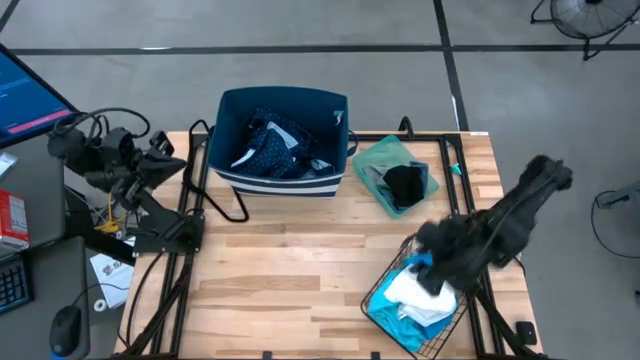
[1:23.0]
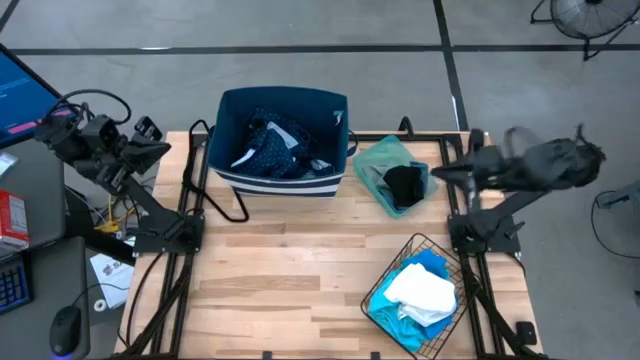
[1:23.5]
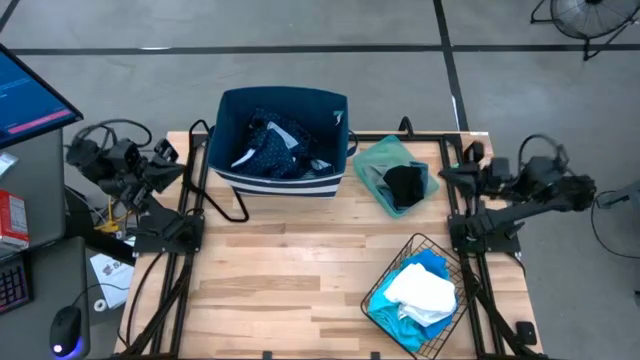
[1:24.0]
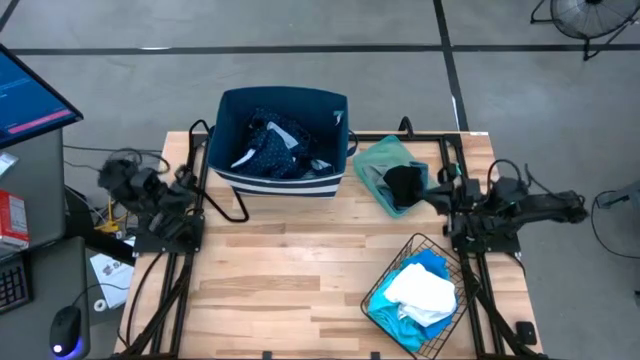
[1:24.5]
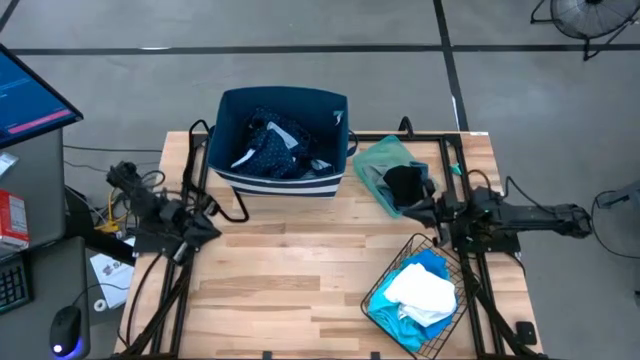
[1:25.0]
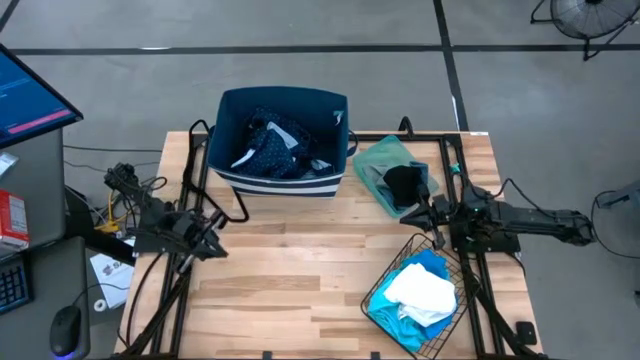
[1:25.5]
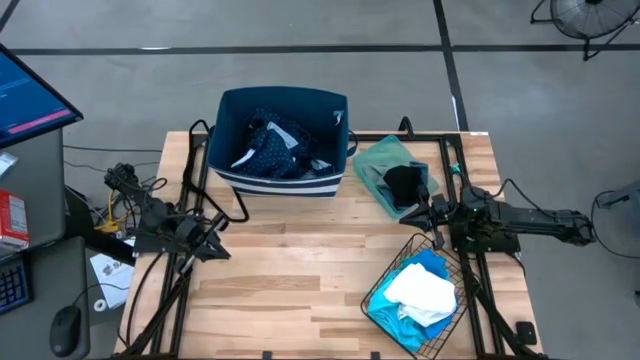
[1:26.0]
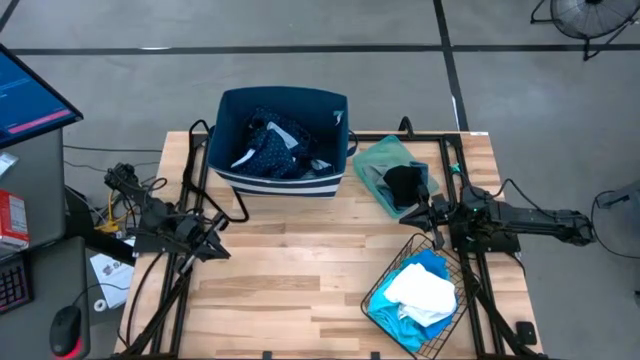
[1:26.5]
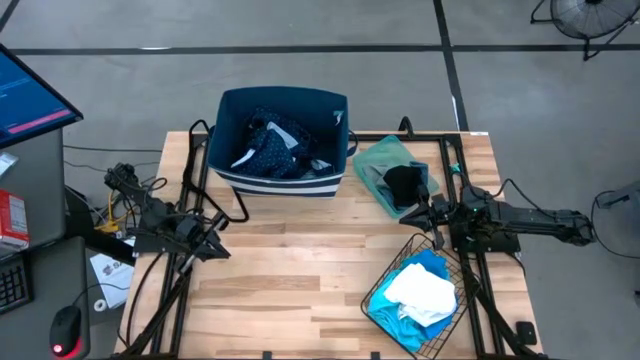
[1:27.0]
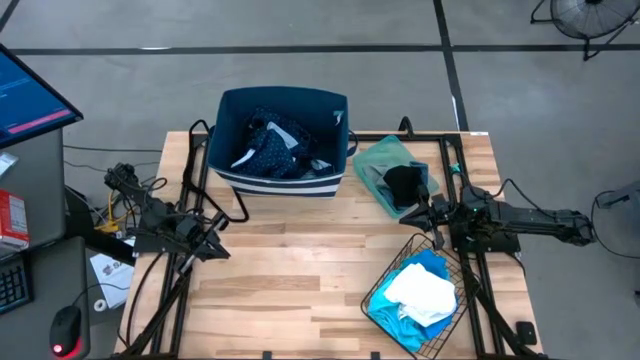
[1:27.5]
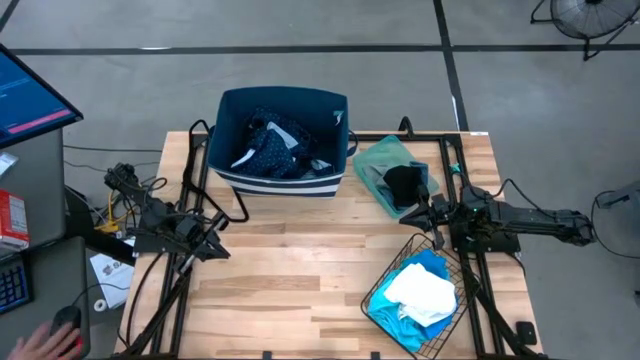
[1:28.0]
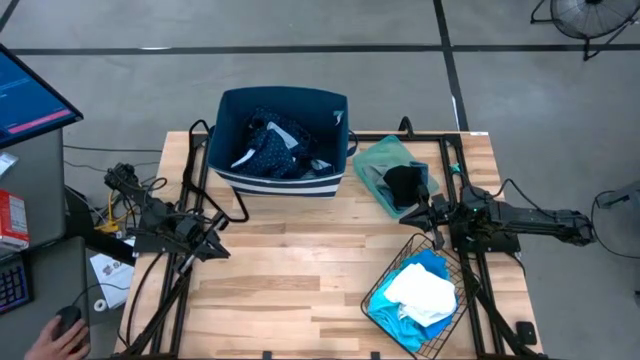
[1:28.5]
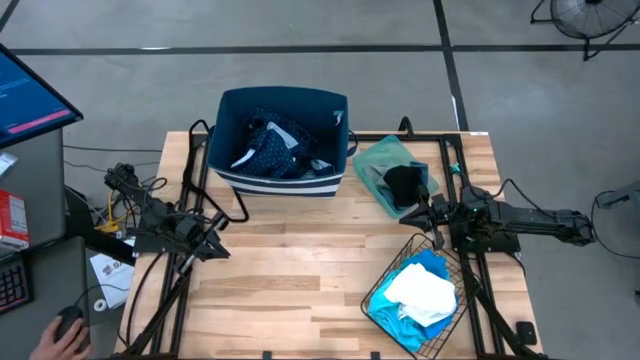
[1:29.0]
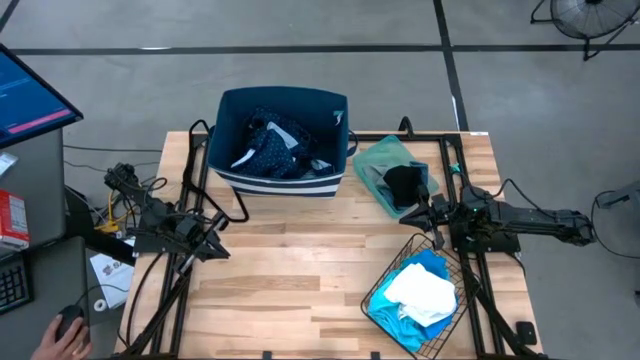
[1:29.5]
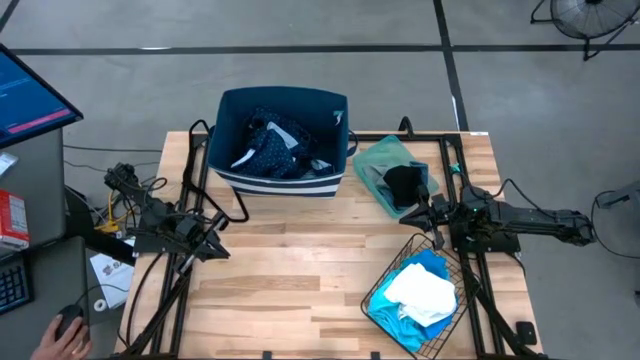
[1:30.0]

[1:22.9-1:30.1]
Task: Pick & Place Cloths
Return to Home Position

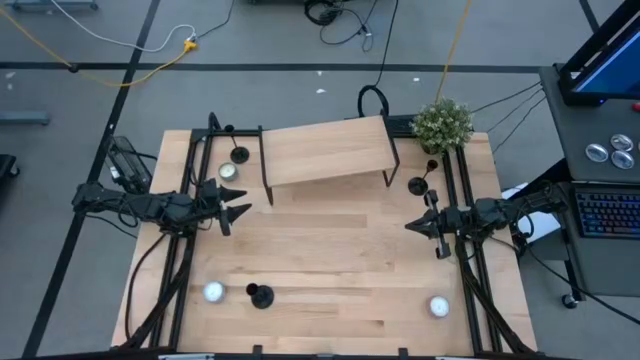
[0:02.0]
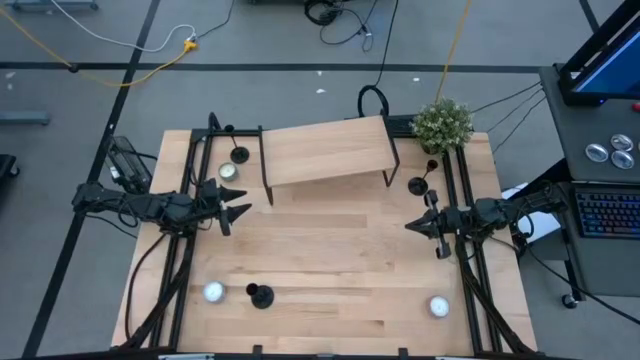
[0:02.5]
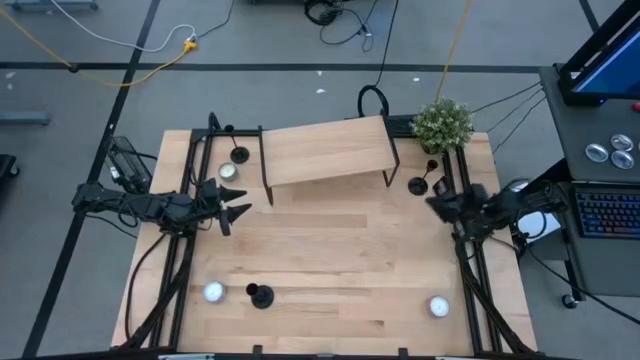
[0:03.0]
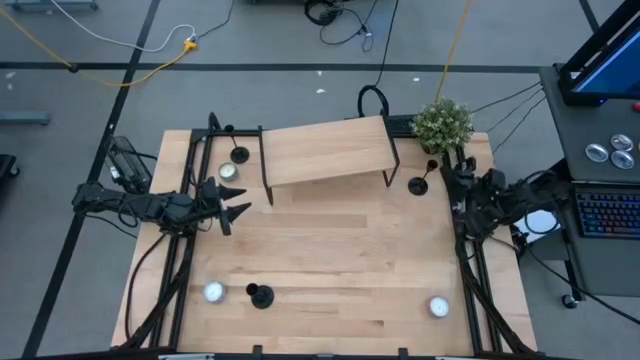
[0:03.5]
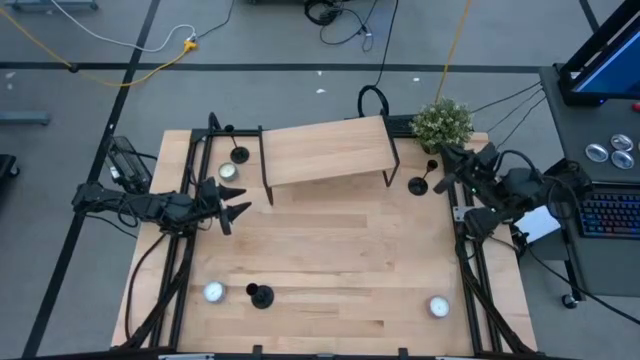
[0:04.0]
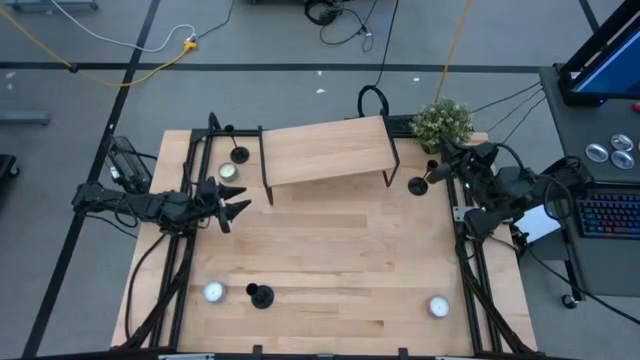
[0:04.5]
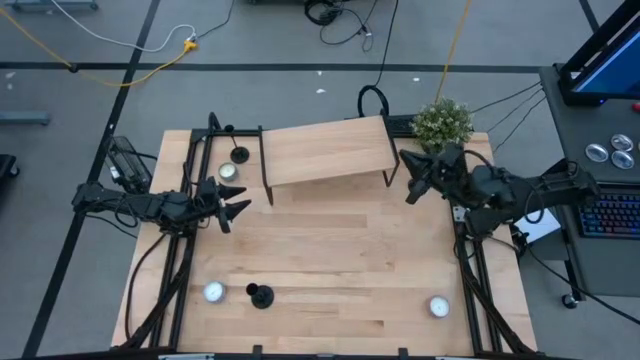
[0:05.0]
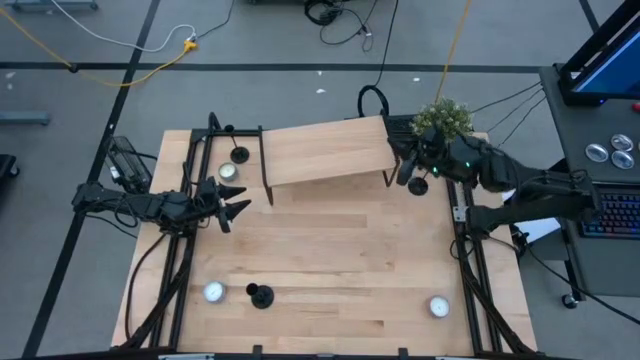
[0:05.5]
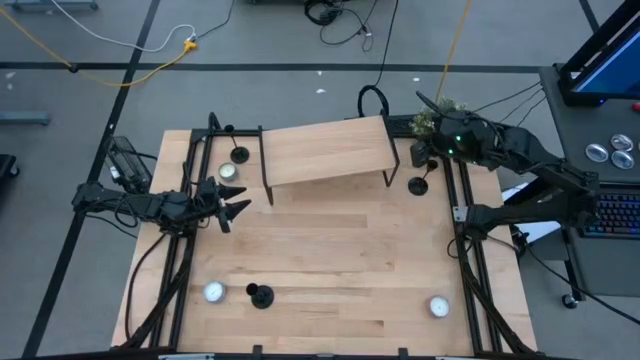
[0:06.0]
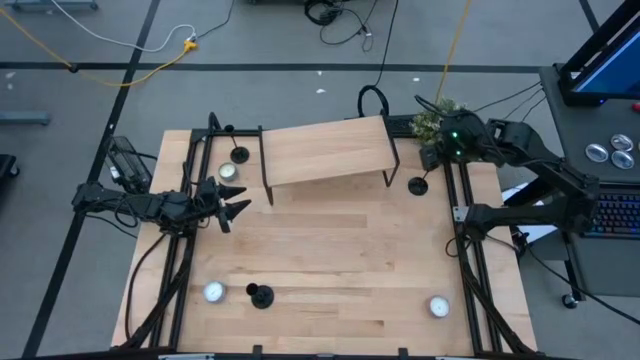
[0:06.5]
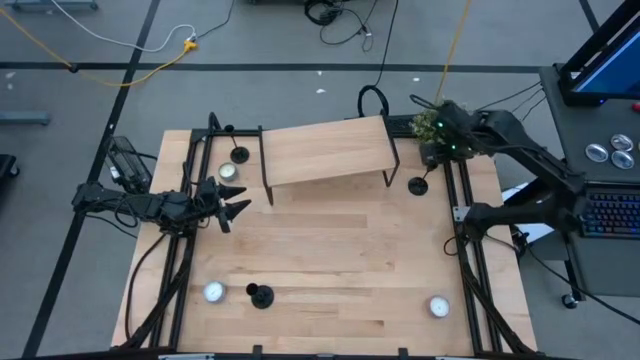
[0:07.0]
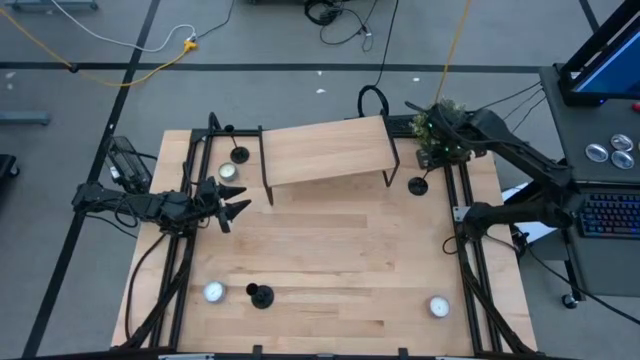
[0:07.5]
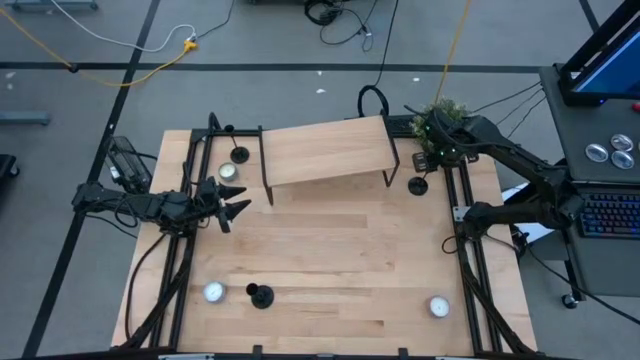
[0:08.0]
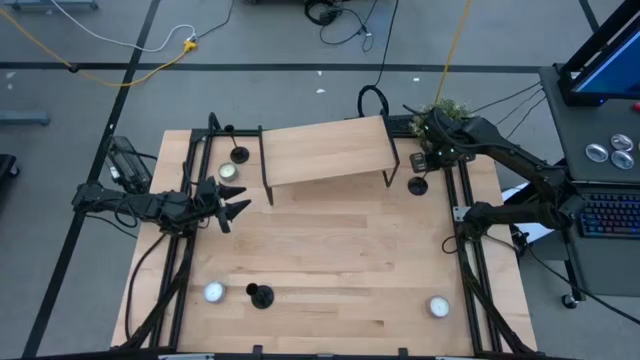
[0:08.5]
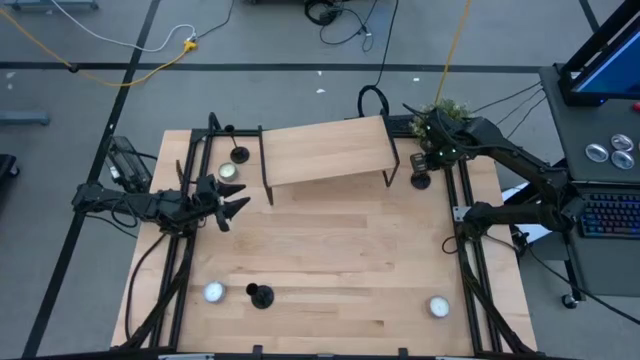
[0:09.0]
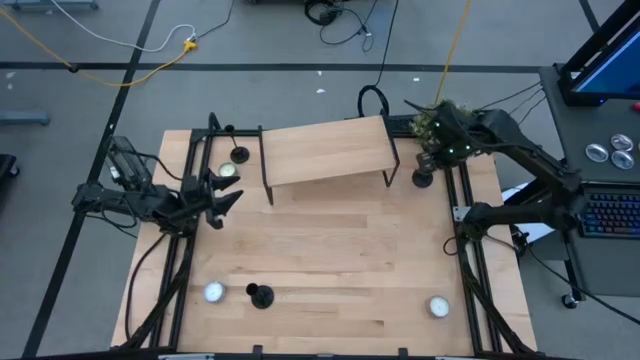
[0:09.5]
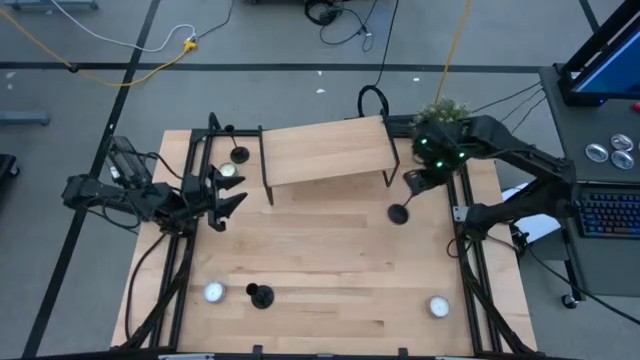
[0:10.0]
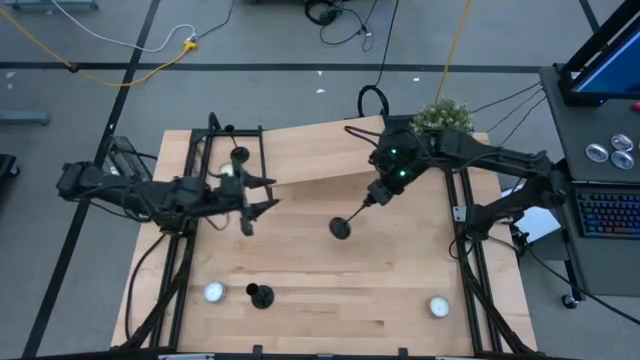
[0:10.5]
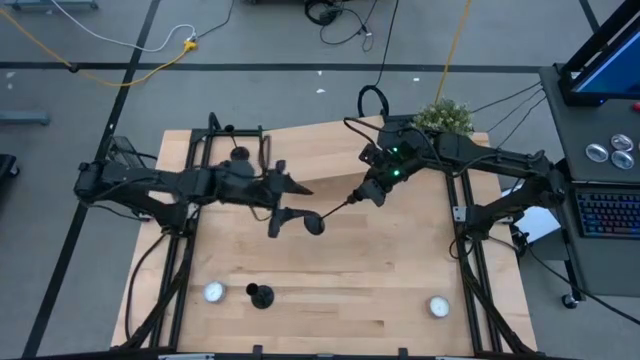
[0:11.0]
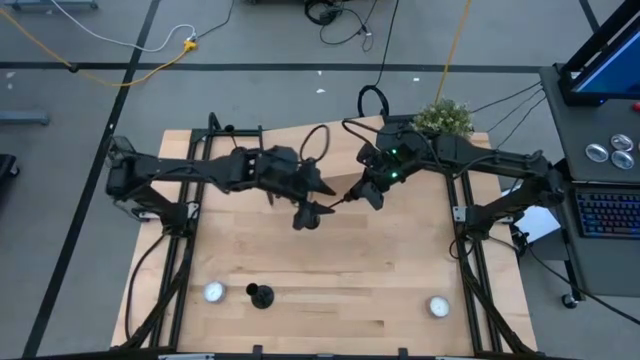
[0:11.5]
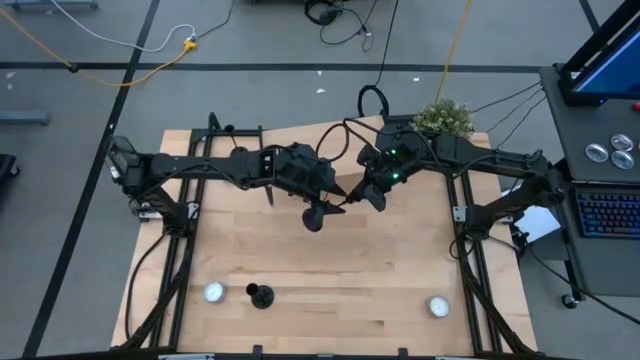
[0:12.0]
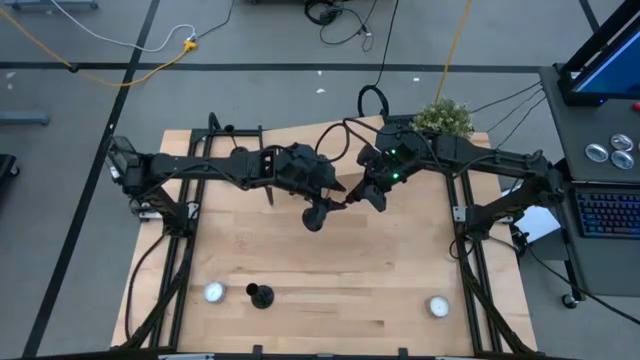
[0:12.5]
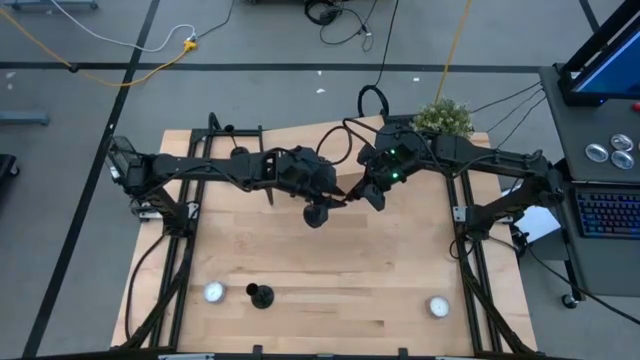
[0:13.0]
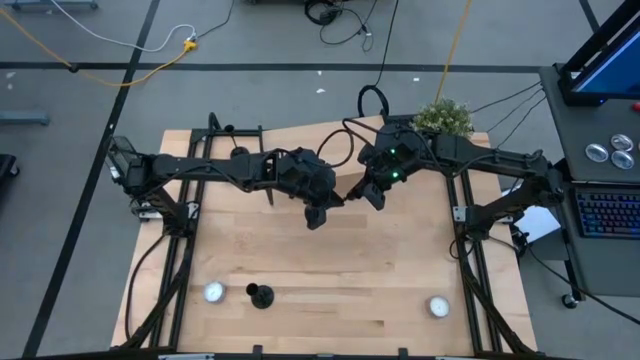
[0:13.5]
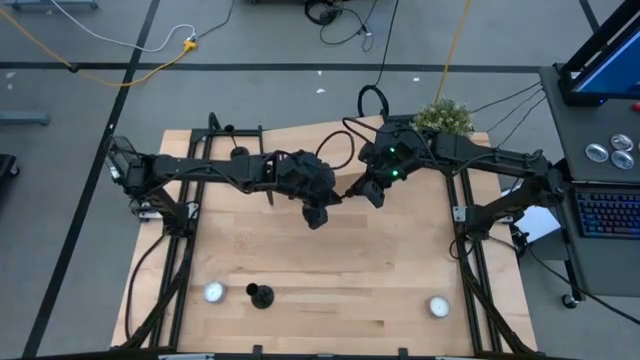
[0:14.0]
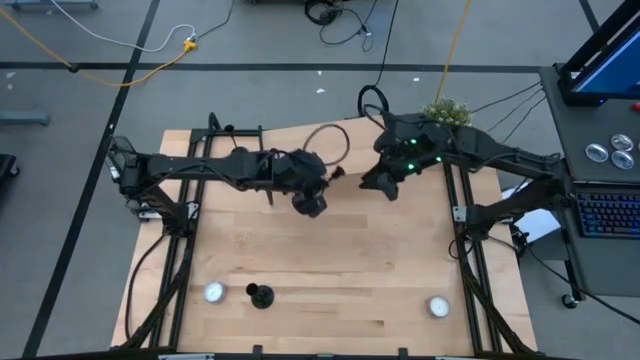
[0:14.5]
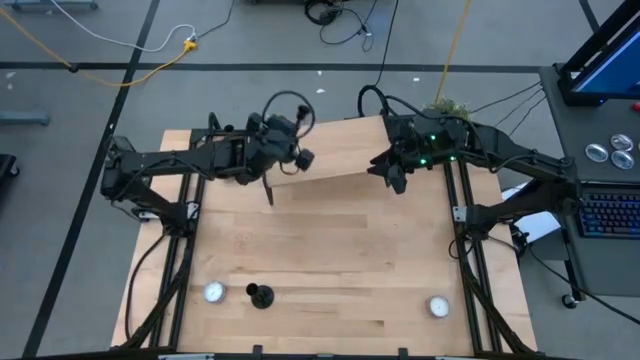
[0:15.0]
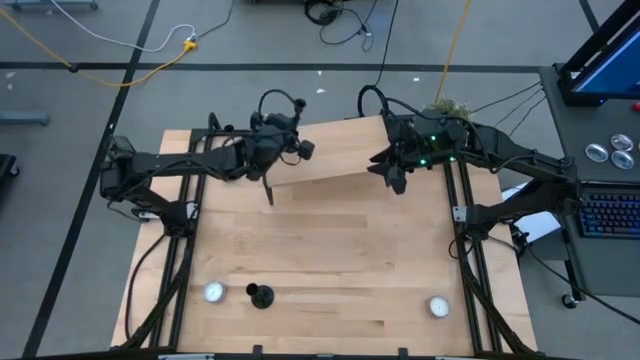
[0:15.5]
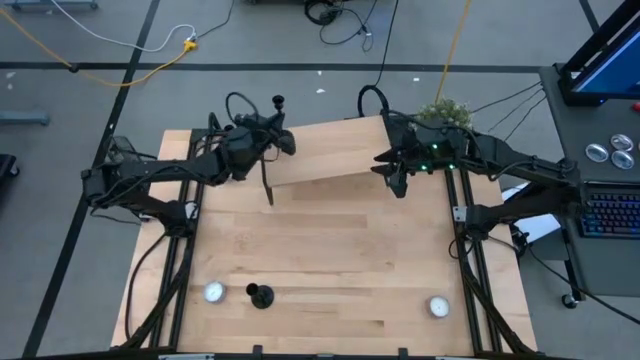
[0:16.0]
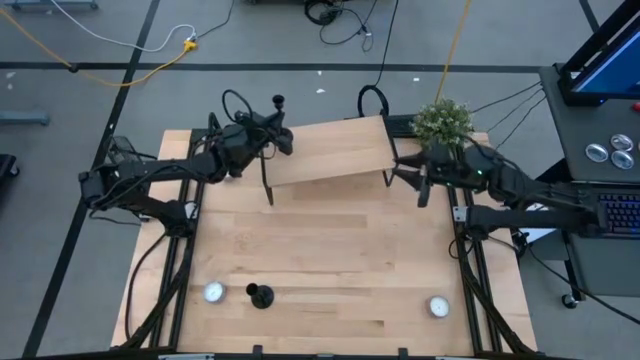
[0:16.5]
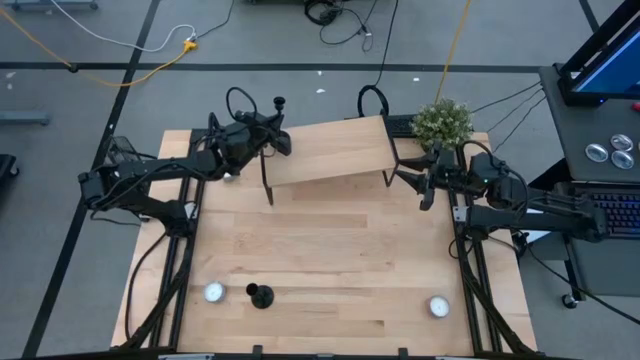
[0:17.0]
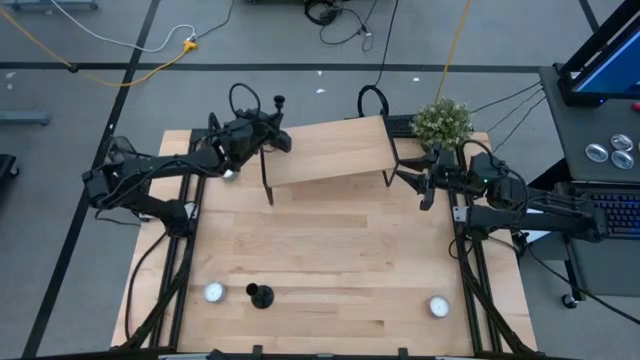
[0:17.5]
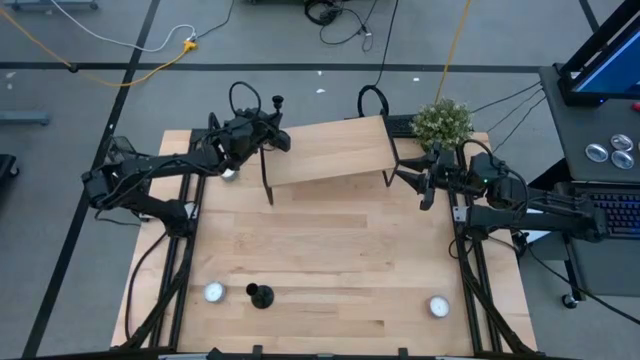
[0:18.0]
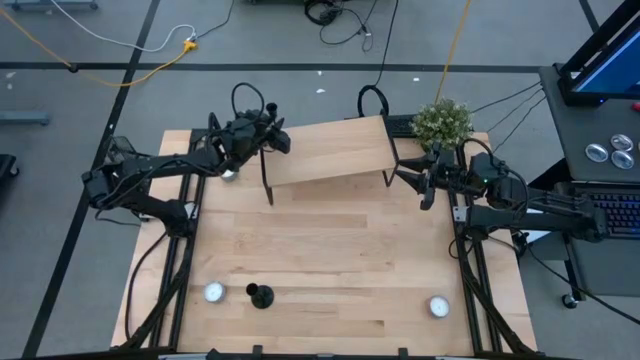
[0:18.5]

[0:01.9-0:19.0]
Task: Pick & Place candle stick holders
Put the top right candle holder on the shelf
